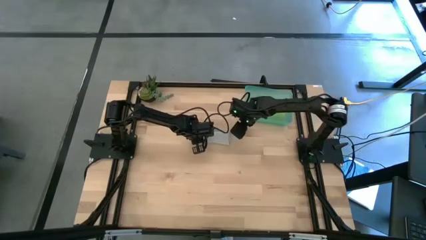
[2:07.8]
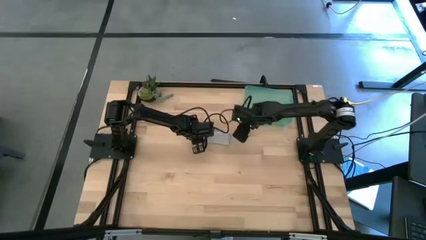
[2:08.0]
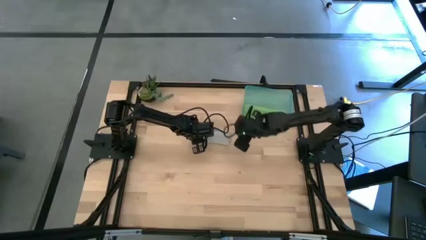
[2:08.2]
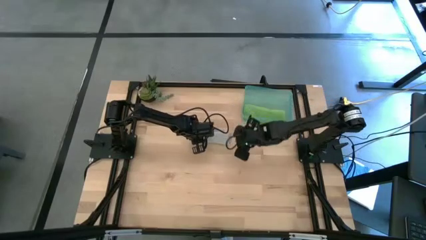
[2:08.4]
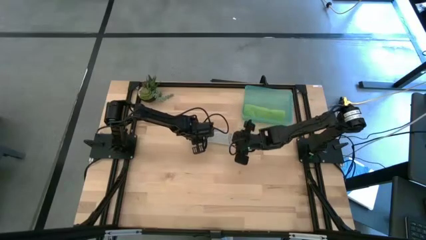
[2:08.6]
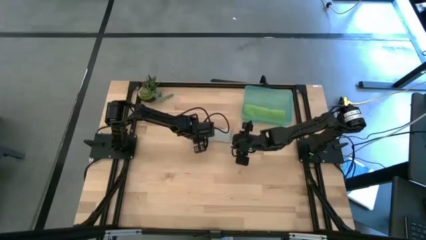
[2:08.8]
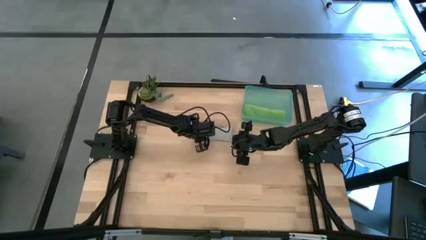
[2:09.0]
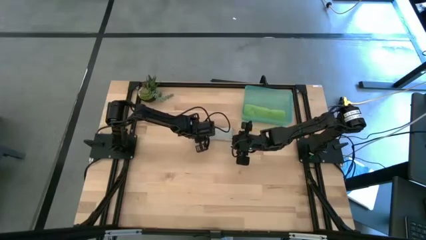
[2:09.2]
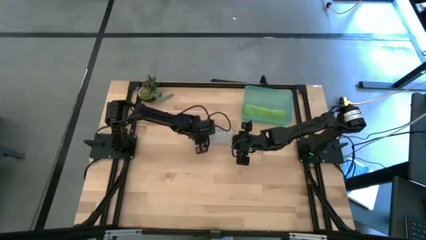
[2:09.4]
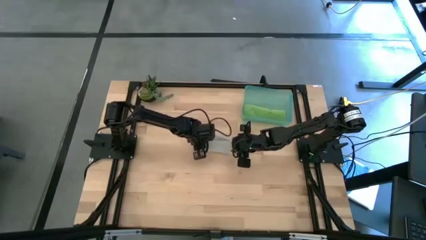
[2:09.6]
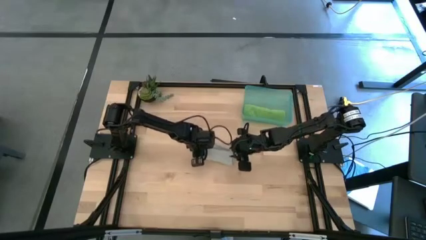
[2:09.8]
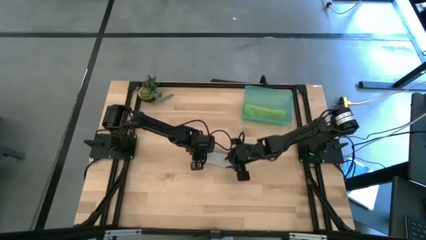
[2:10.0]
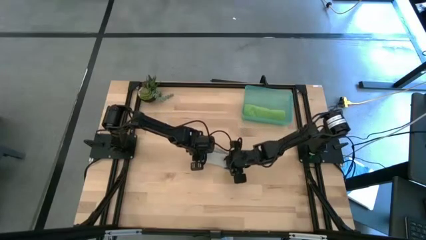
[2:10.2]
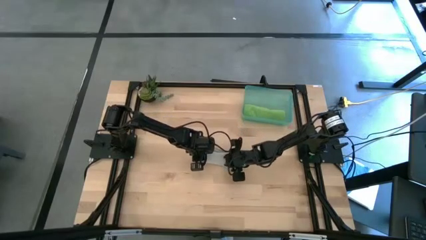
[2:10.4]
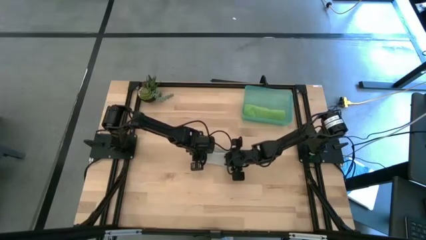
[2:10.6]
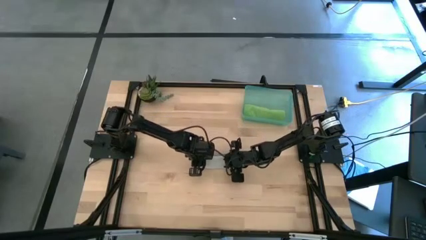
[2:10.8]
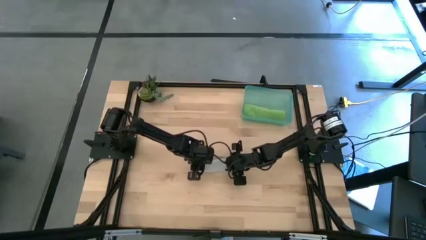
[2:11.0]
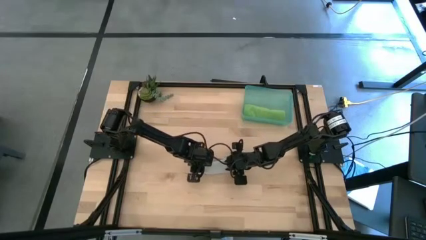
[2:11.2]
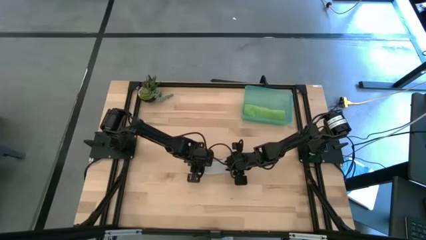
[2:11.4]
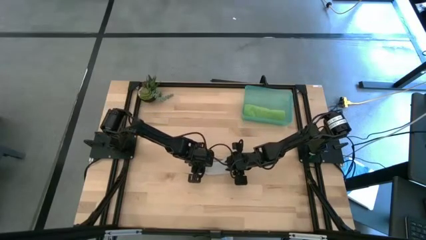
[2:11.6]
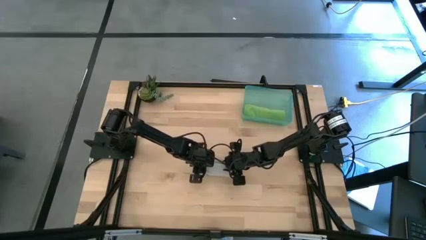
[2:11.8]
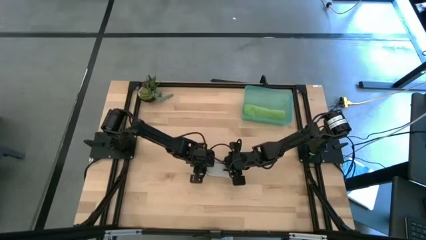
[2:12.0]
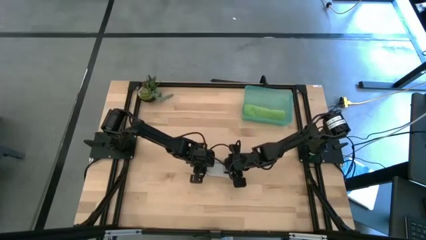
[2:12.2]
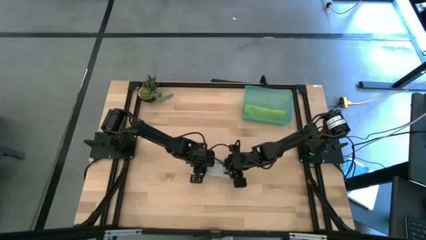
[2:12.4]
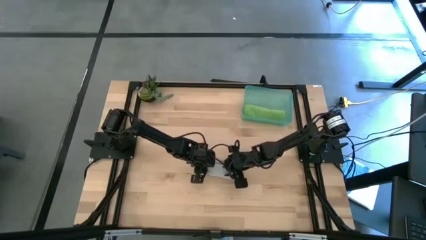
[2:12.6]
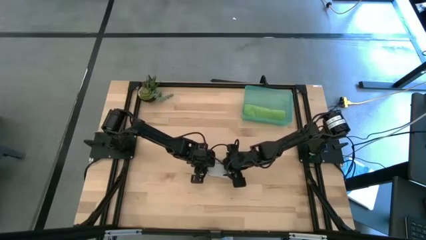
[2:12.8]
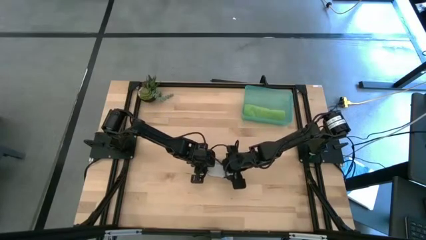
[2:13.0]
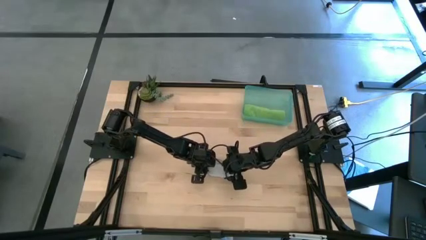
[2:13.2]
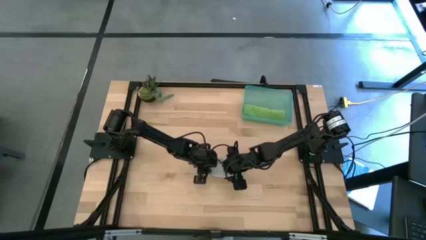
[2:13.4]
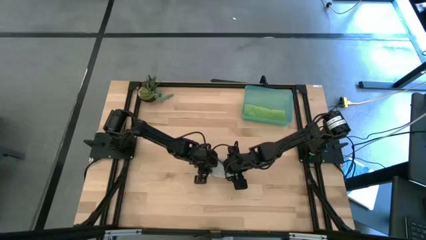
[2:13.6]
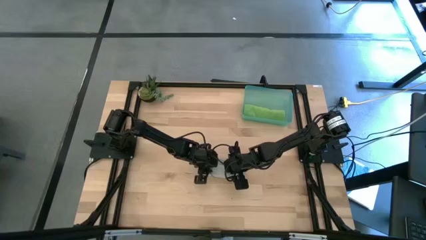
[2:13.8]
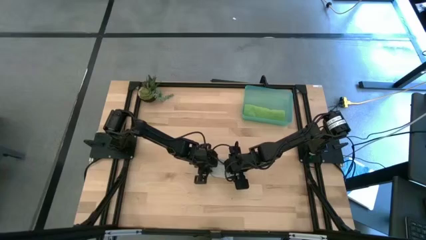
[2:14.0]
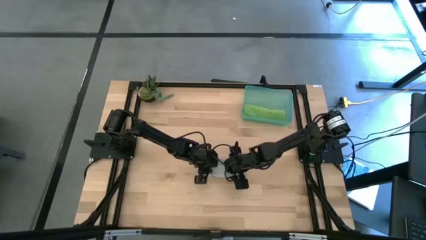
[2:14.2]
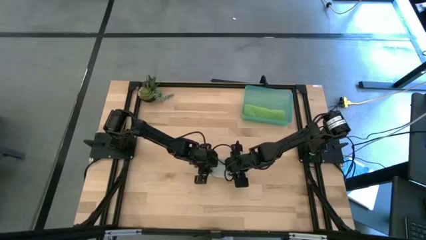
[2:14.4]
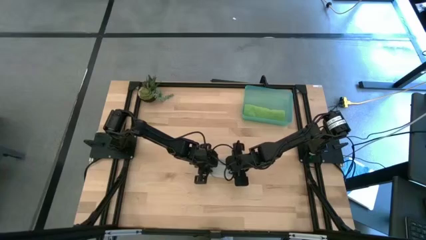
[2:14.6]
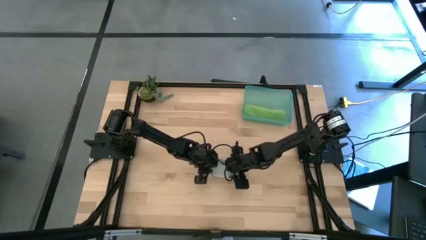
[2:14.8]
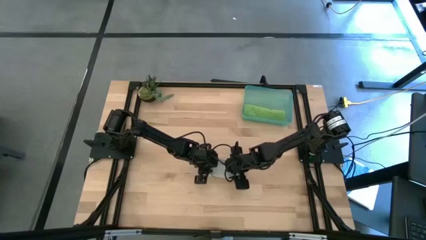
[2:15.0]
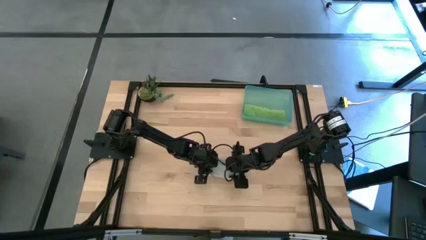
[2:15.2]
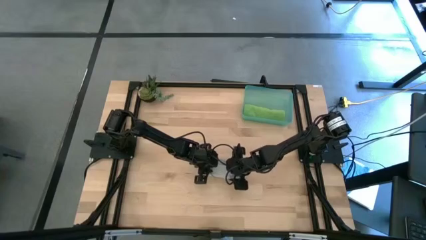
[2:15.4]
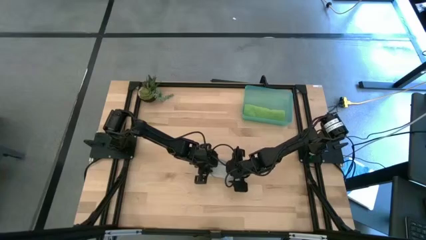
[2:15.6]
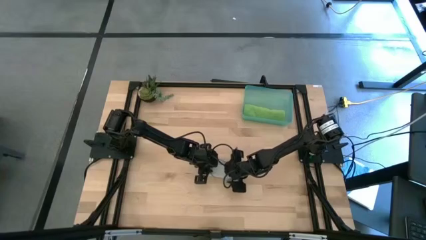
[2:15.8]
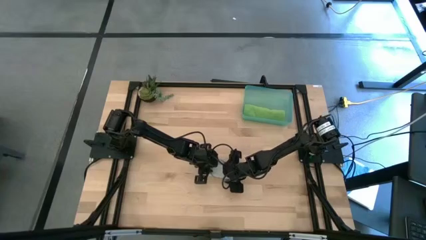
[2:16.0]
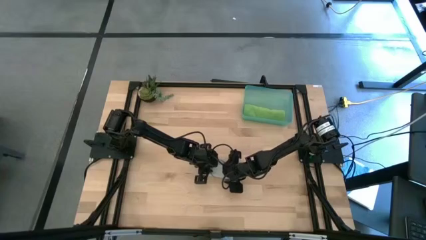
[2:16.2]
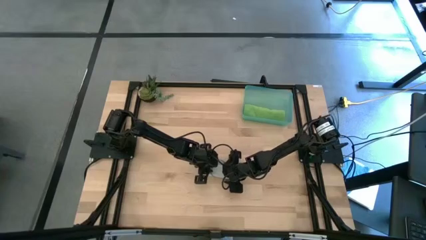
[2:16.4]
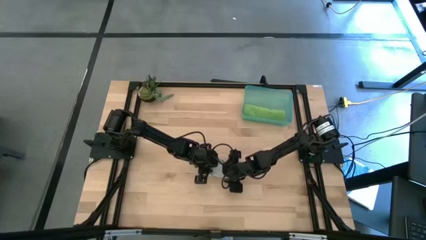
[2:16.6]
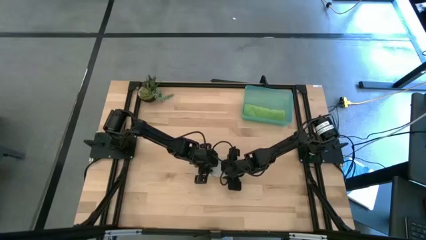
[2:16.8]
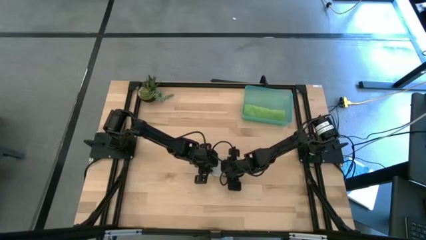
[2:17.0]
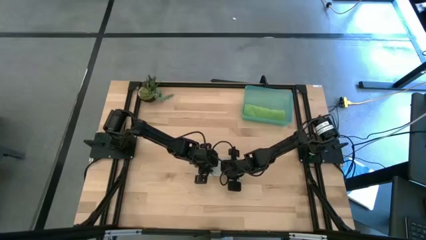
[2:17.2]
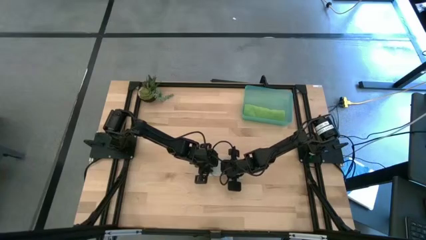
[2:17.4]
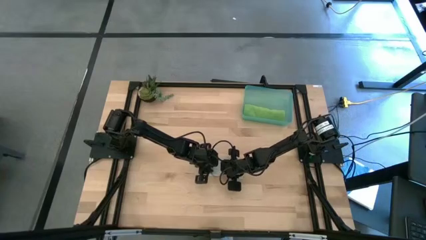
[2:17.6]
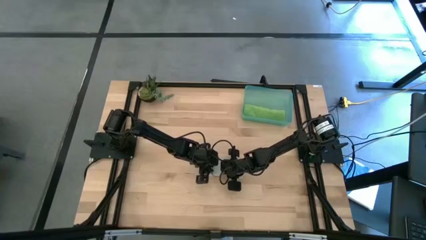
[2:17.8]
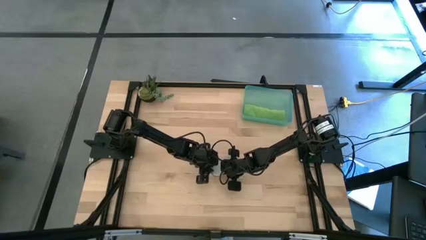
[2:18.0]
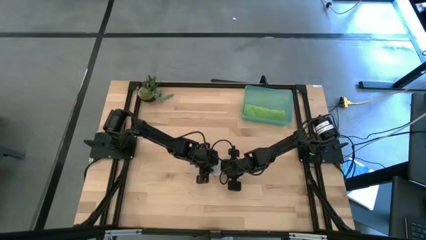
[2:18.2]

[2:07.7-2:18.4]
Task: Roll microfiber towels into tight, uniform cylinder then place into a basket
Put the gray kitchen towel into the green bin

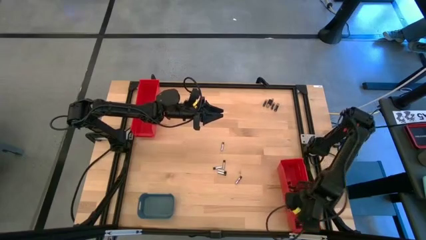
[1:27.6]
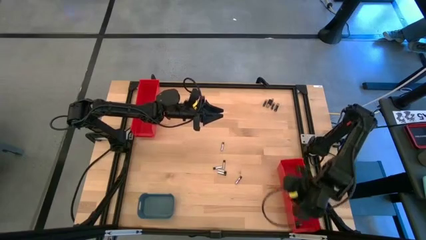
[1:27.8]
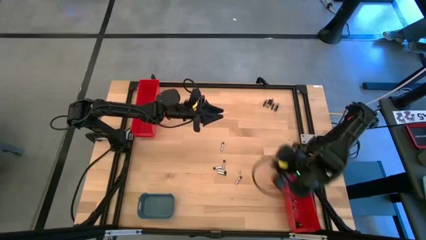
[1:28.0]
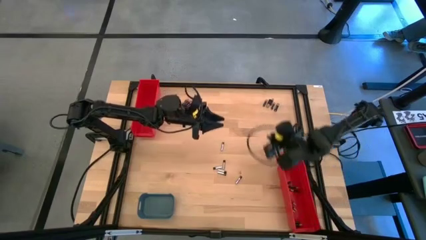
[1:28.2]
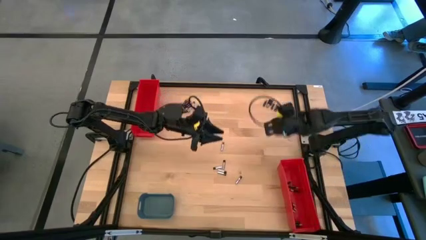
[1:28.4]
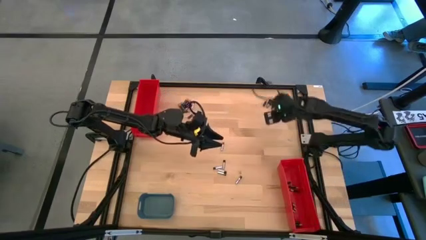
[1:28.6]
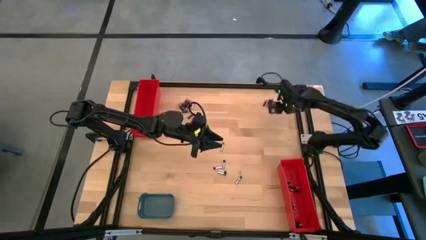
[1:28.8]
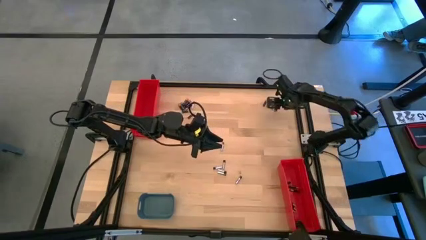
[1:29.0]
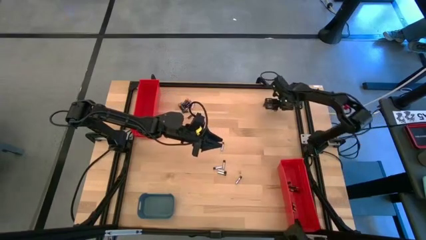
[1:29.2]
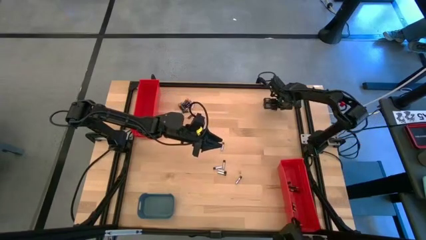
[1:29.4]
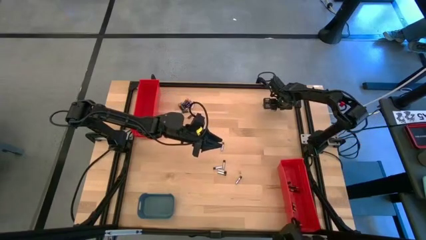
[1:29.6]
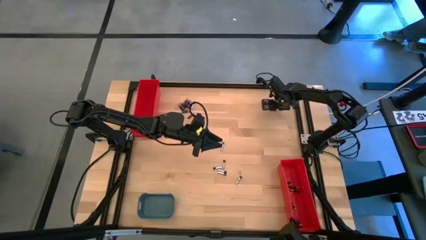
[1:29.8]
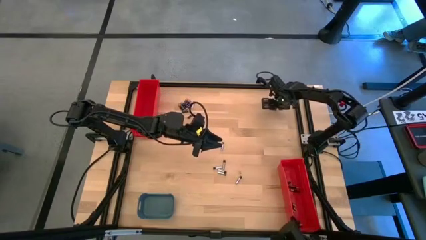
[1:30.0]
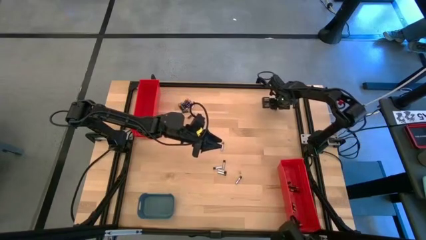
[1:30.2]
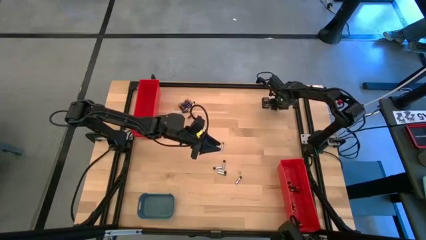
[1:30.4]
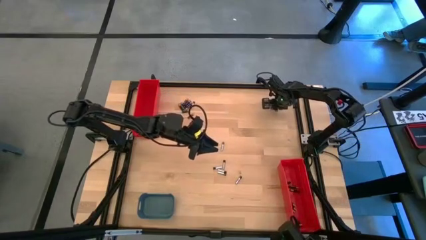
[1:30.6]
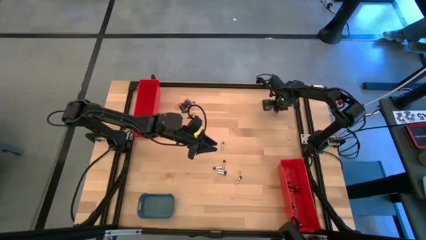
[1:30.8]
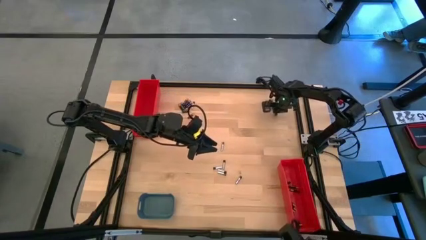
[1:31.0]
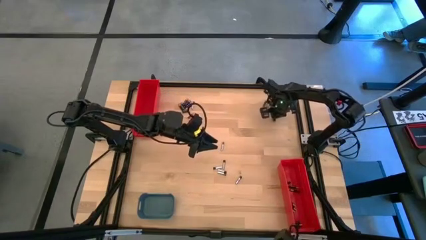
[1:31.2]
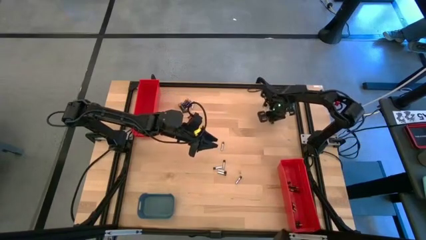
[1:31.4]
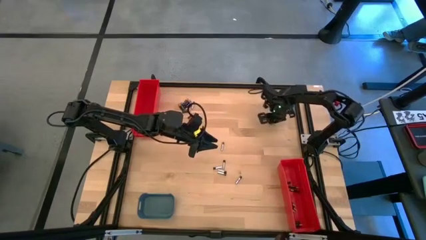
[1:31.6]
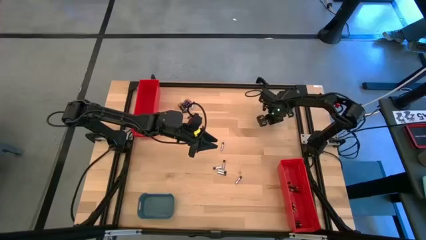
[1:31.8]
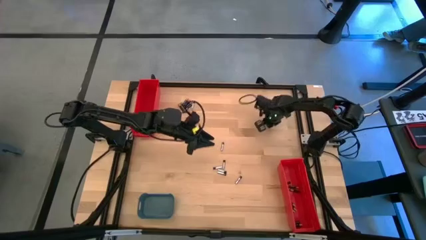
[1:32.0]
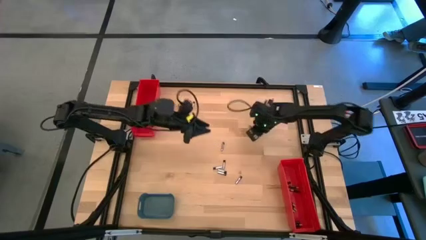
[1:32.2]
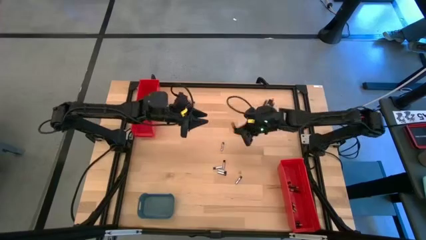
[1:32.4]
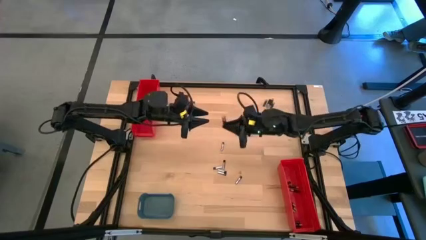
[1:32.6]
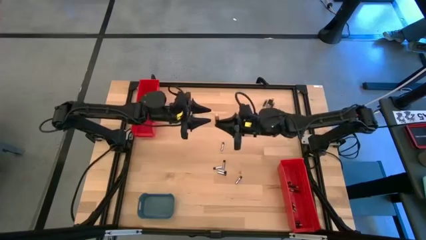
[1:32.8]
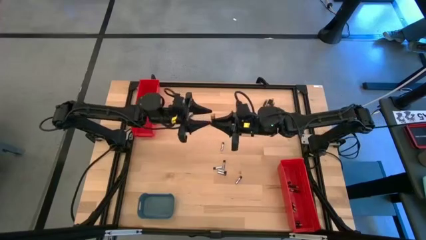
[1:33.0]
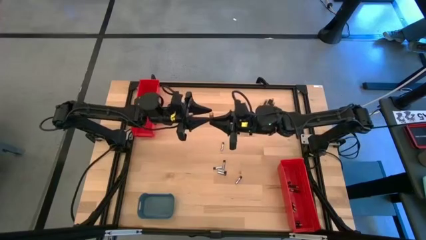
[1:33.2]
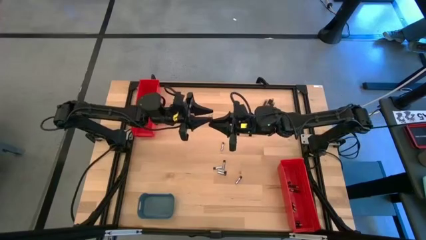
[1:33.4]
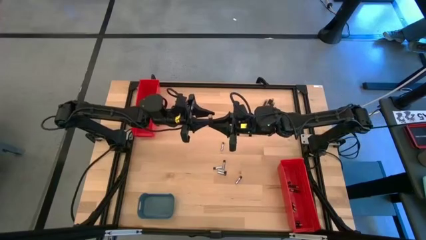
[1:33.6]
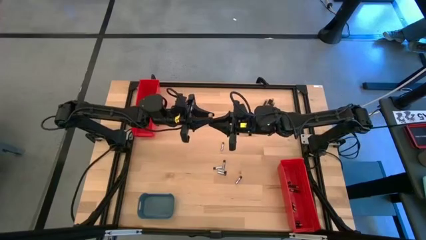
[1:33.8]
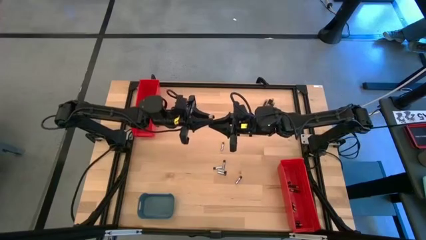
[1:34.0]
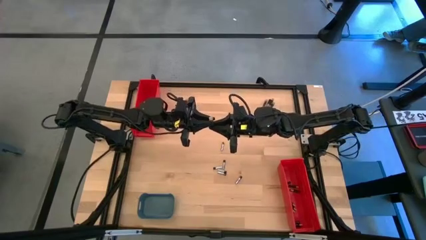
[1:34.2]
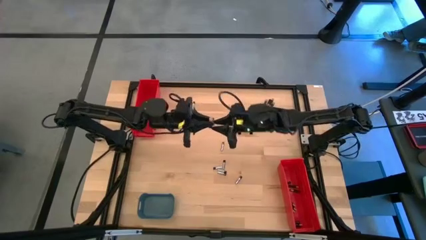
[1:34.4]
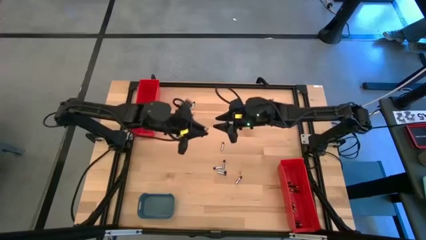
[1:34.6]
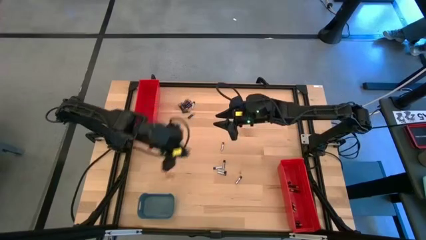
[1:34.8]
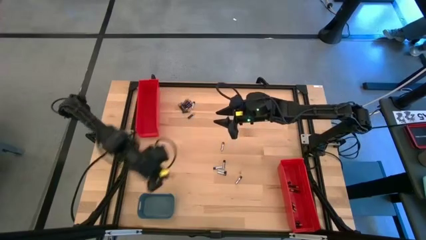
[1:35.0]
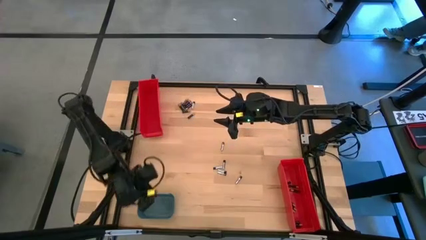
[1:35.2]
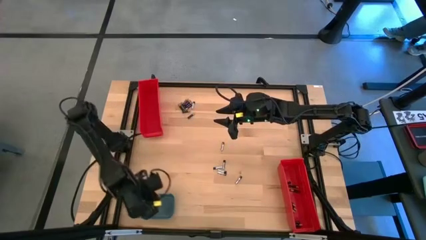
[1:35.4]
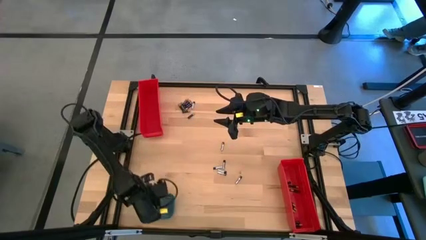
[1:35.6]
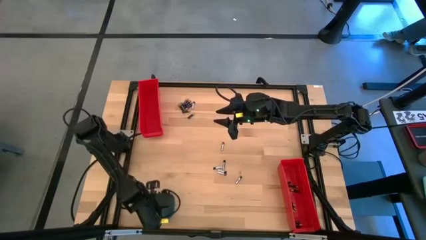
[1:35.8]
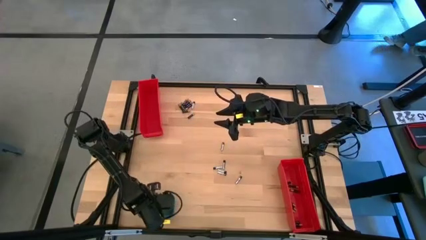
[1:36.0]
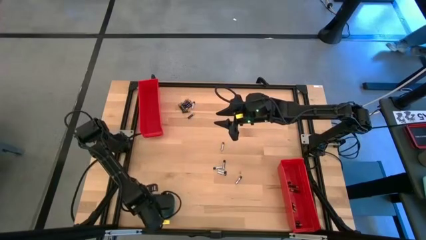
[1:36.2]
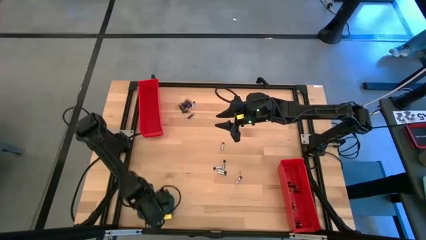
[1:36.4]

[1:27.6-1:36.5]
Task: Sort batteries
Put the large black battery into the blue bin
